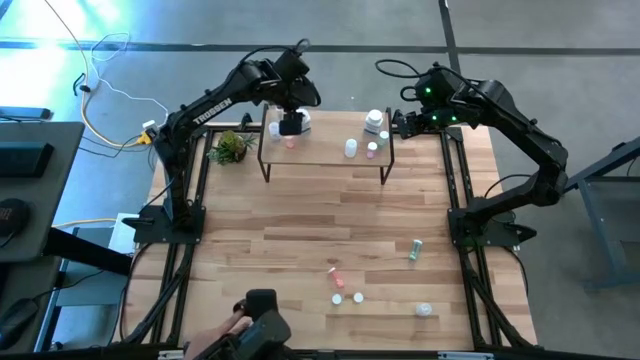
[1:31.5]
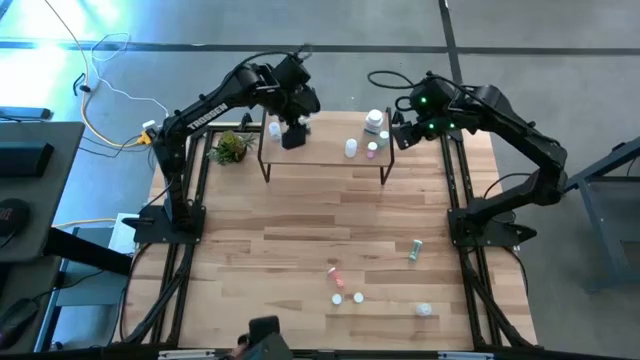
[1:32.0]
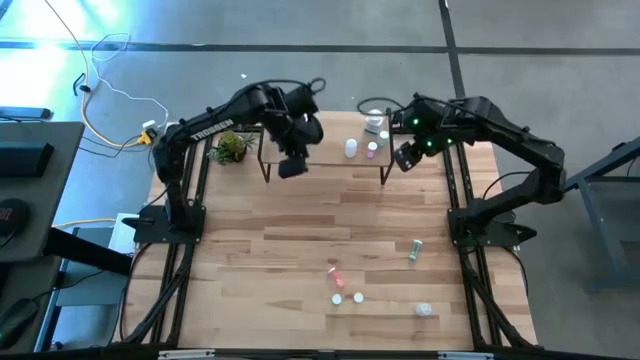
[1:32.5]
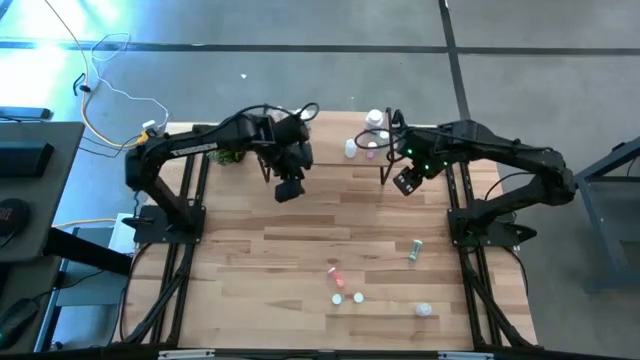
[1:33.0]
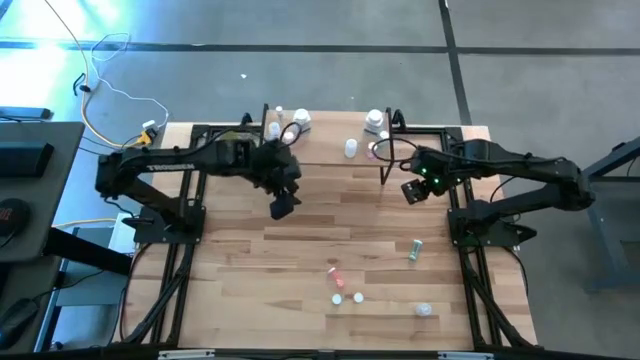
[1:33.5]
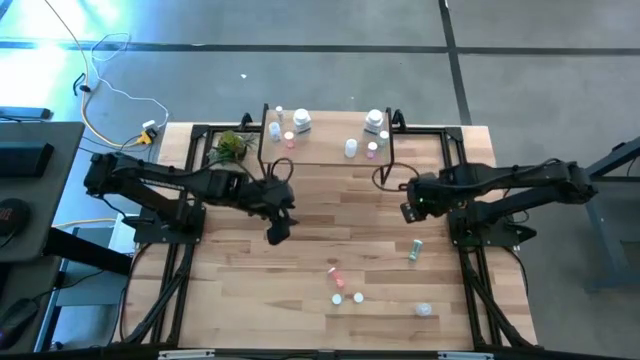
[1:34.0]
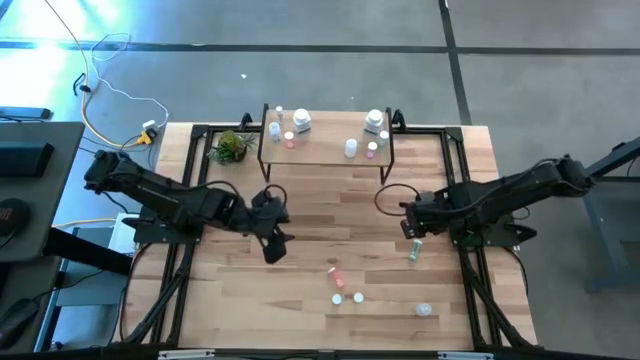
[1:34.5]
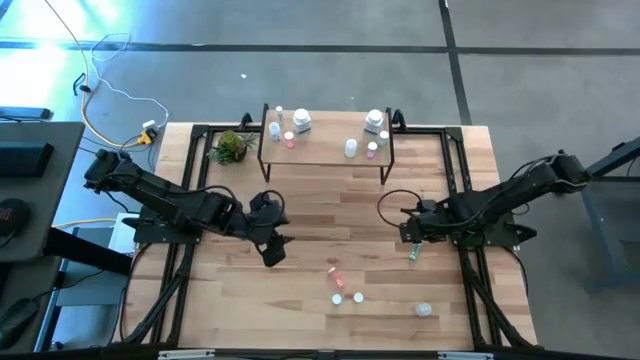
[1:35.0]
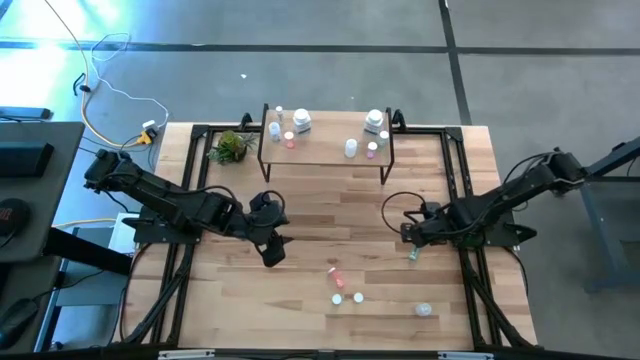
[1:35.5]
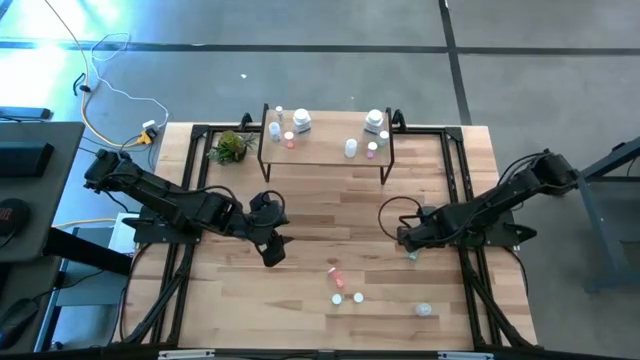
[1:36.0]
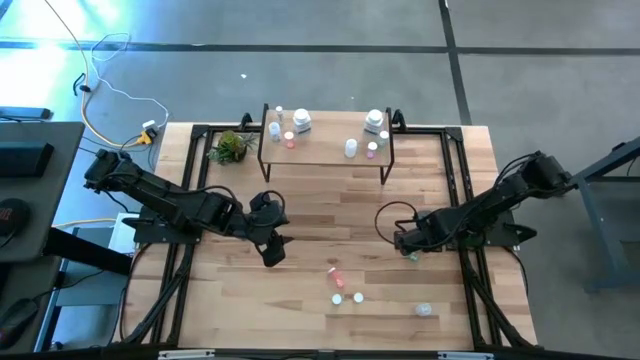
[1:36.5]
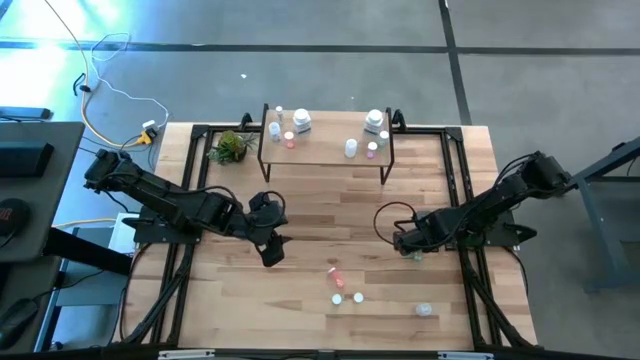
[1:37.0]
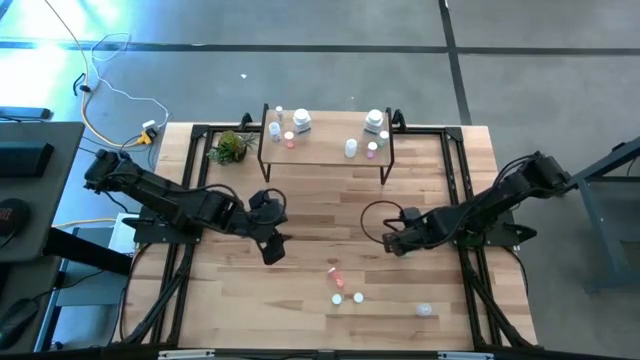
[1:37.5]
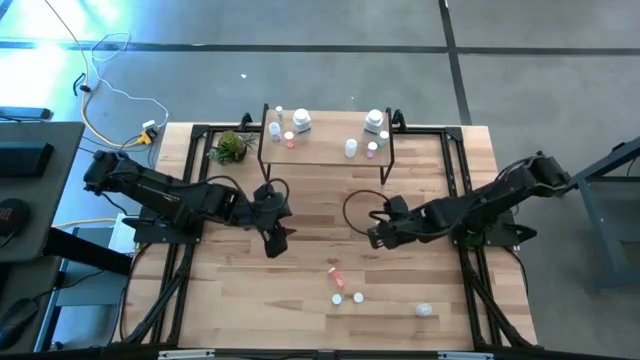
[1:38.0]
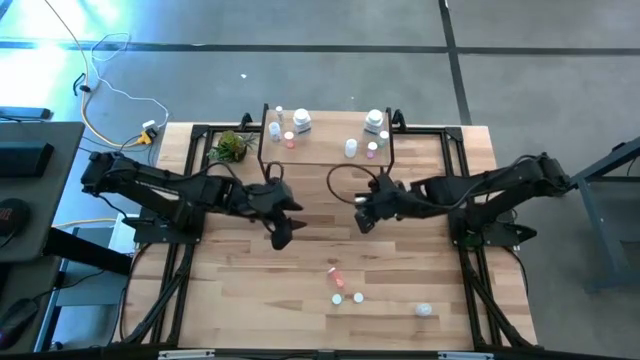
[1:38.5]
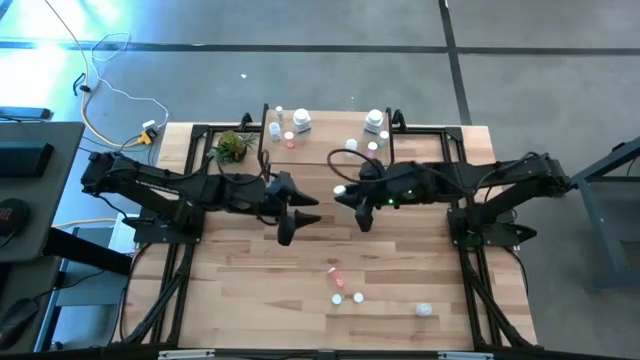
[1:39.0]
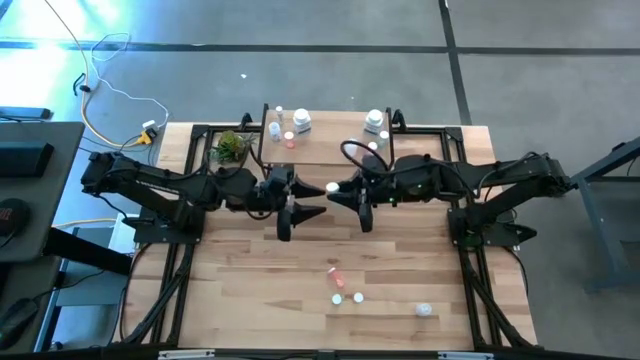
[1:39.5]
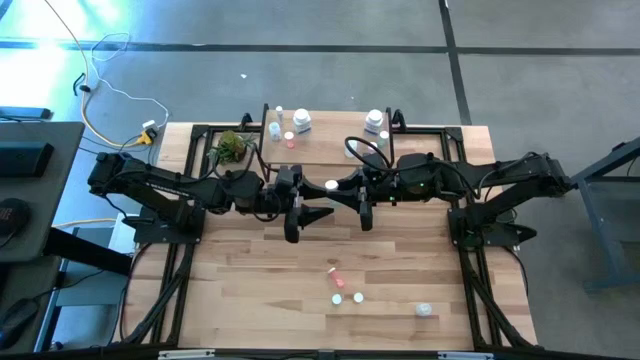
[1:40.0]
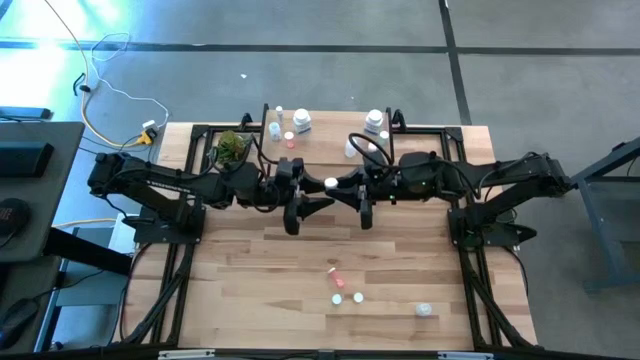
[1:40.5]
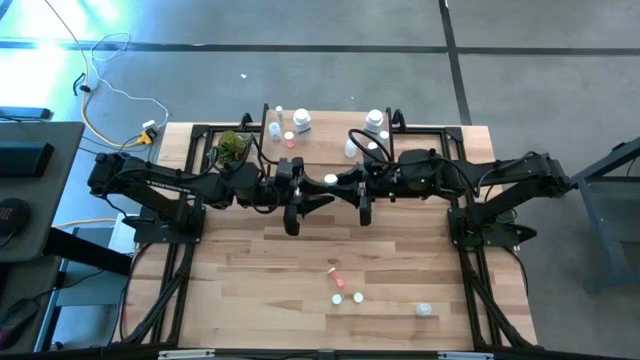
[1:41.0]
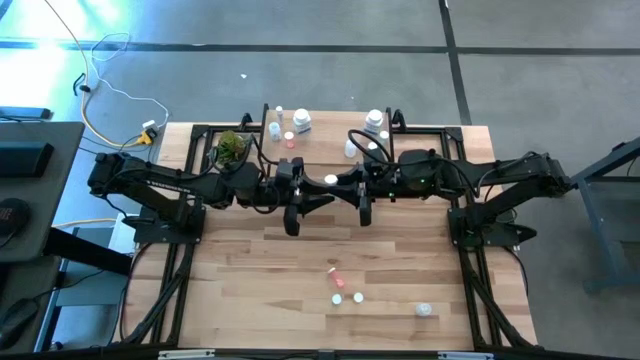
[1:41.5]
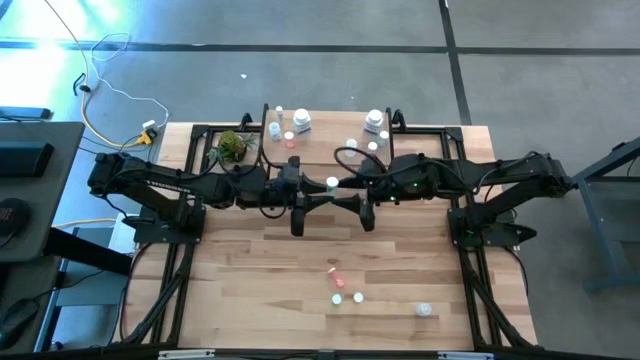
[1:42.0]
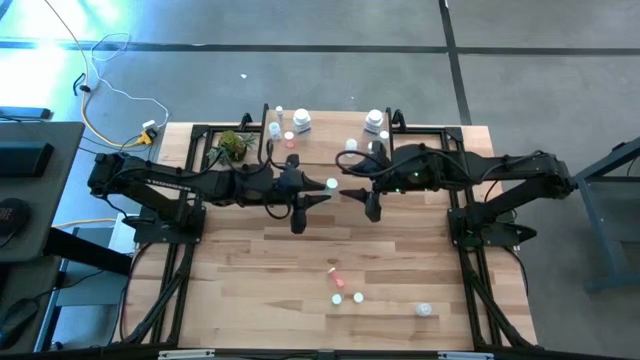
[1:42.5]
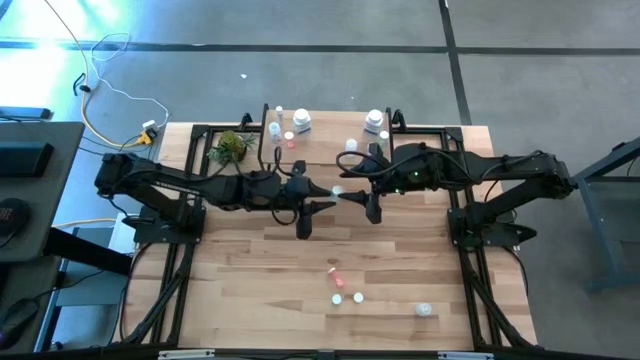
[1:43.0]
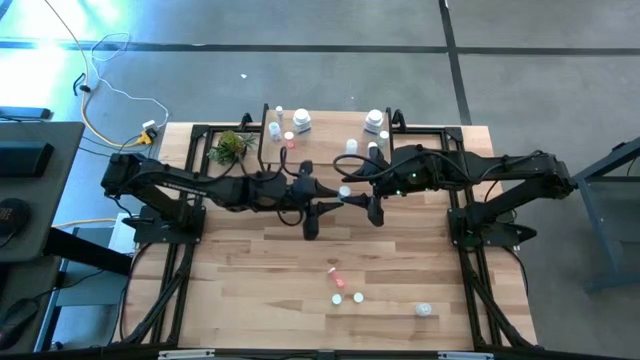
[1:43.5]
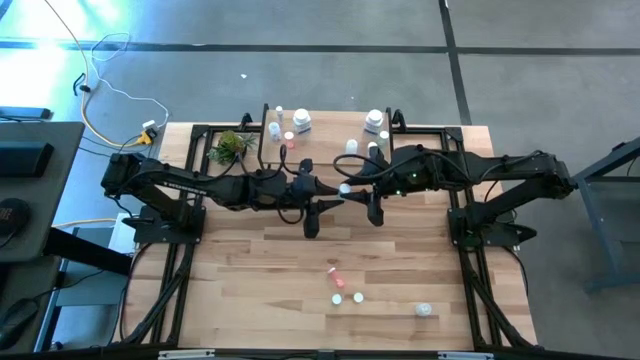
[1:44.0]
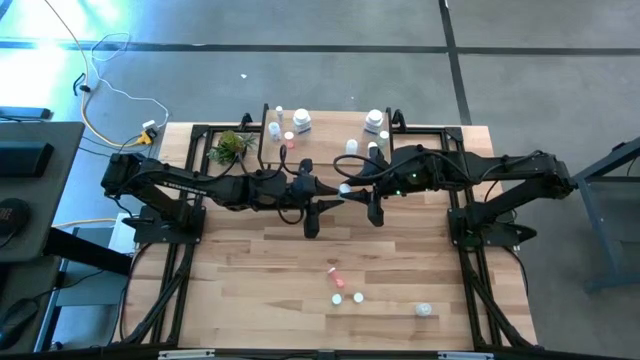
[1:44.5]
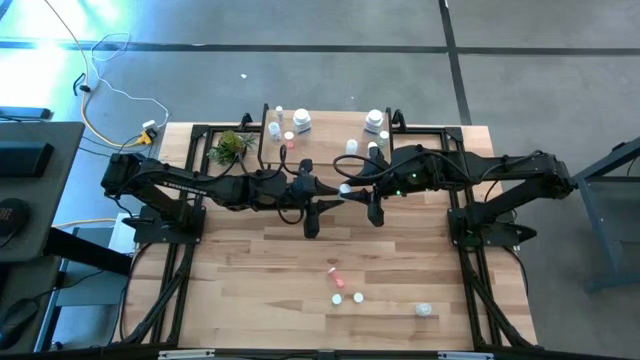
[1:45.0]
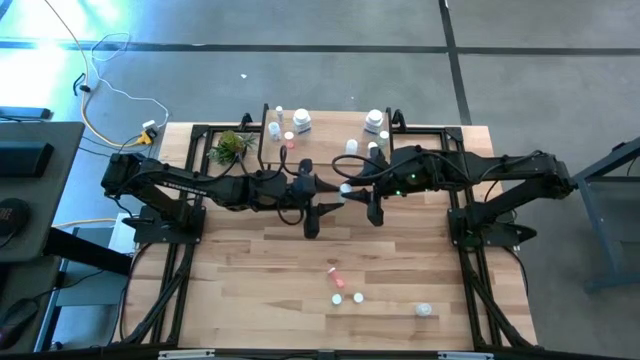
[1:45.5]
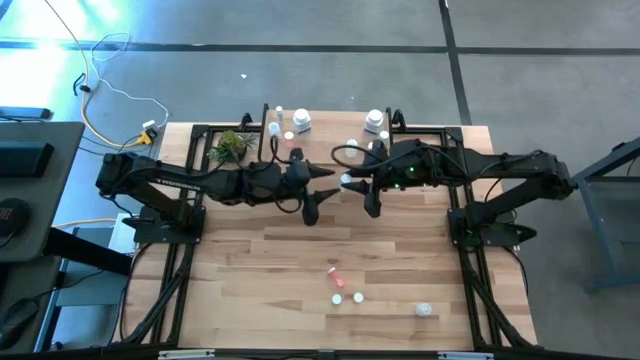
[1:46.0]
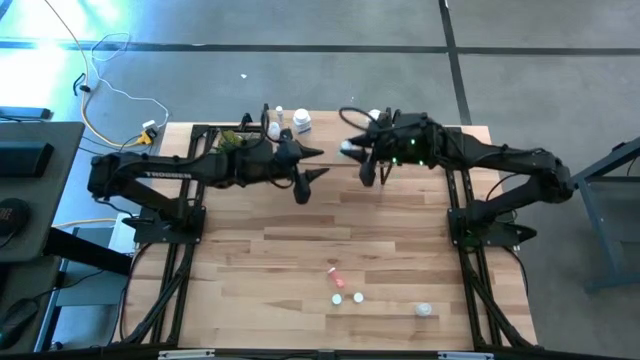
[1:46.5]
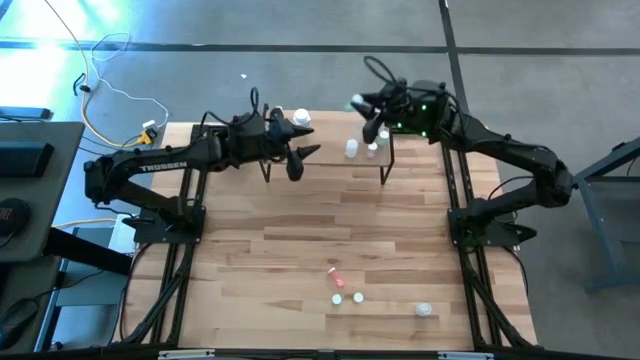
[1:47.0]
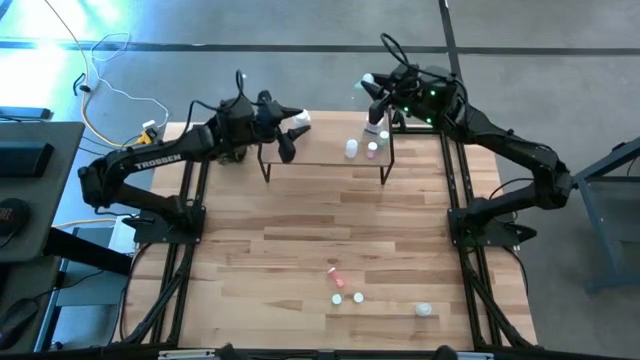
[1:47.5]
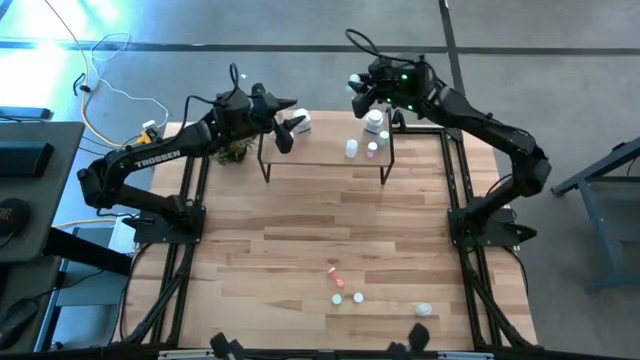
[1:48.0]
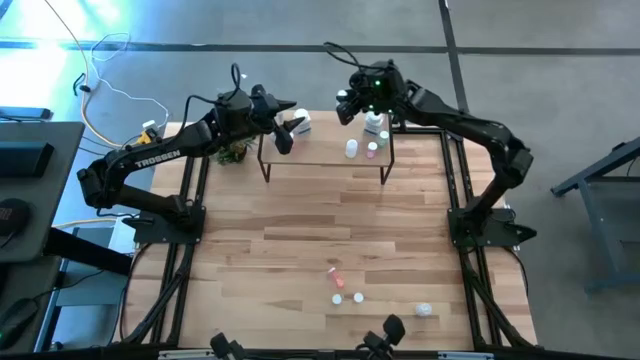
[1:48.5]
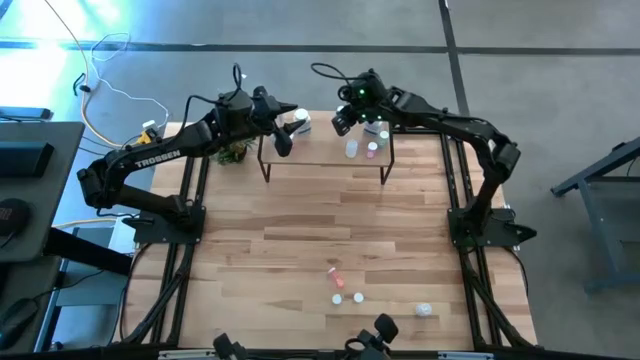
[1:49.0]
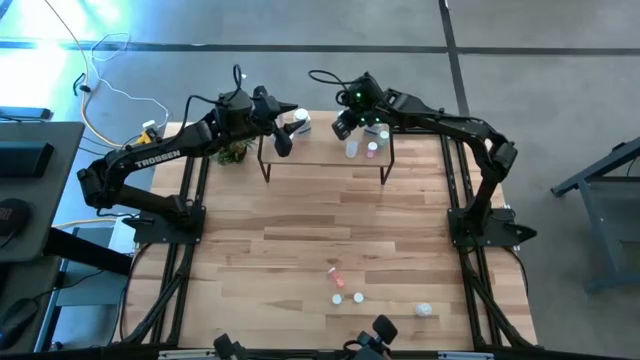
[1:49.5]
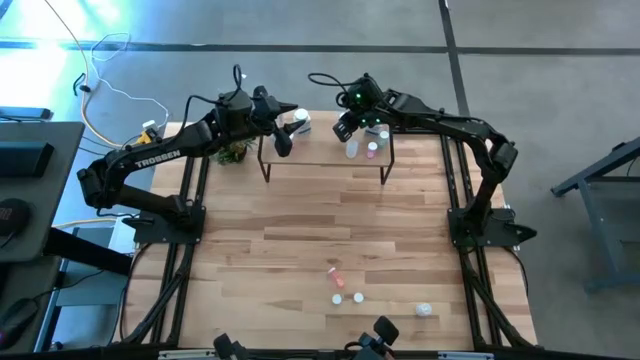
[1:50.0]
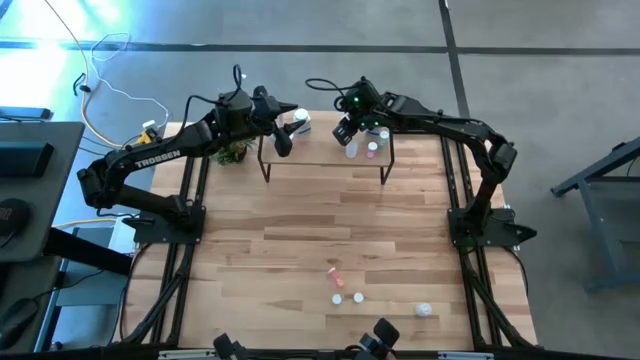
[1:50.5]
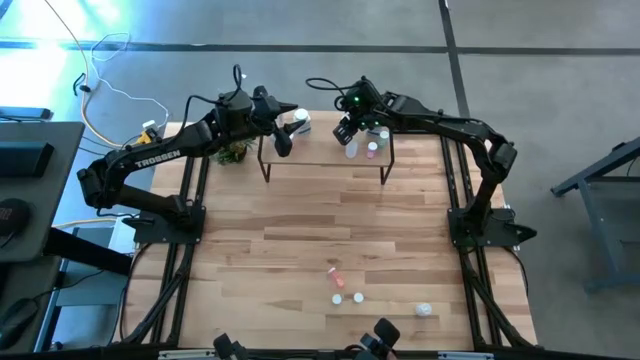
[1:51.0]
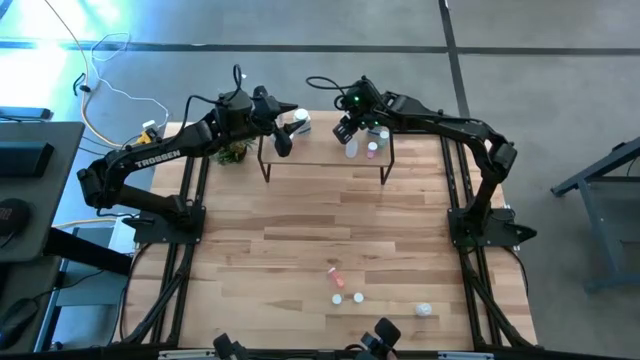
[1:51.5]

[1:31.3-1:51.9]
Task: Pick and place medicine bottles onto shelf by color
Put the top blue pill bottle on the shelf

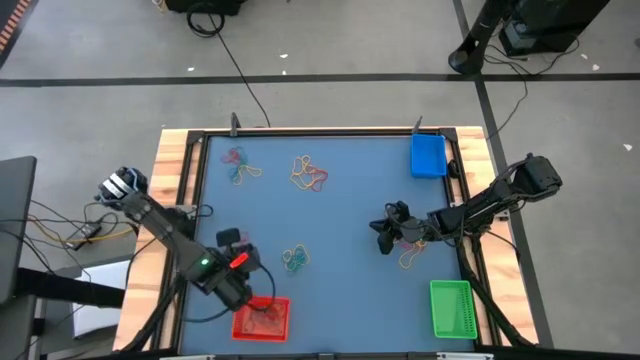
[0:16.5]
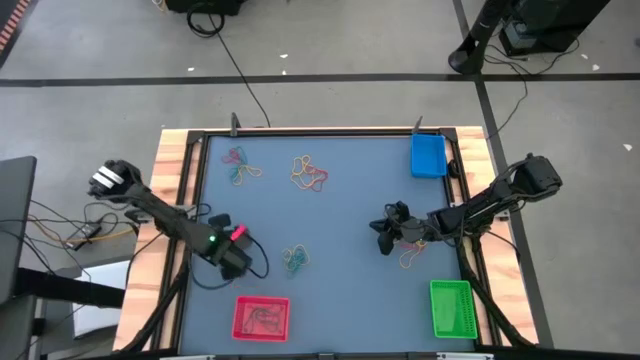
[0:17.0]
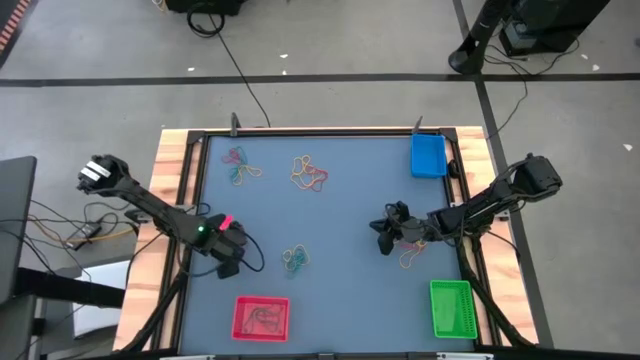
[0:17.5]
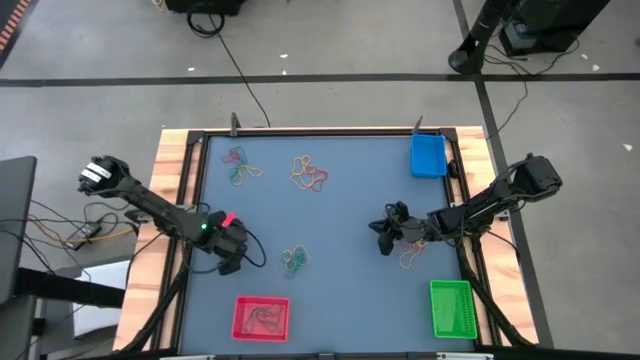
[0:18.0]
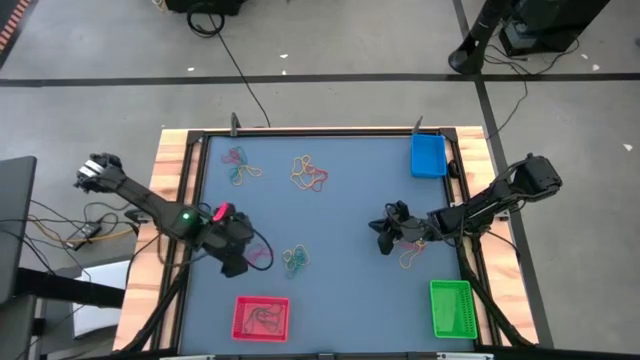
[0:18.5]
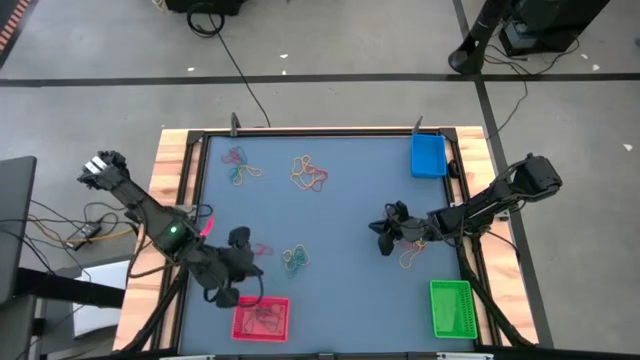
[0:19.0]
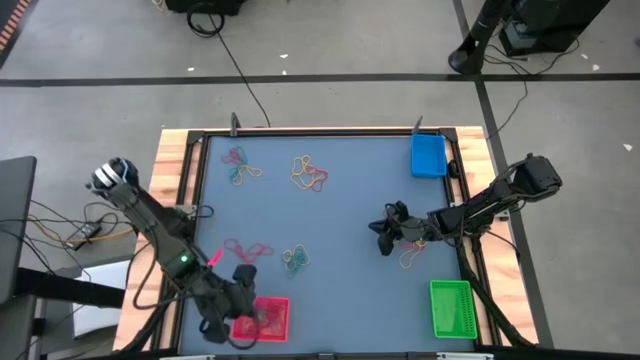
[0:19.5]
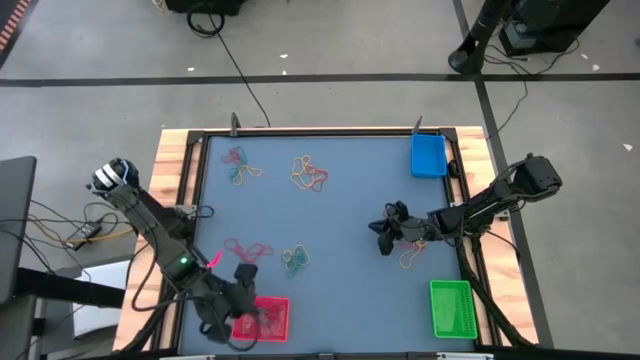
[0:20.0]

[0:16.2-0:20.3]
Task: Sort rubber bands into baskets
Put the blue rubber band into the red bin
